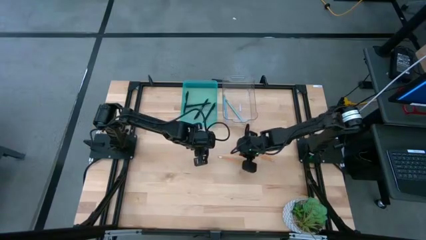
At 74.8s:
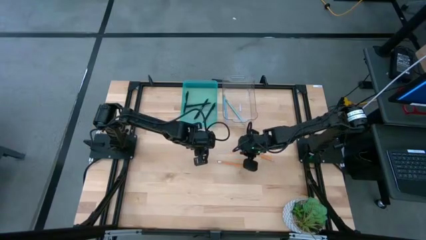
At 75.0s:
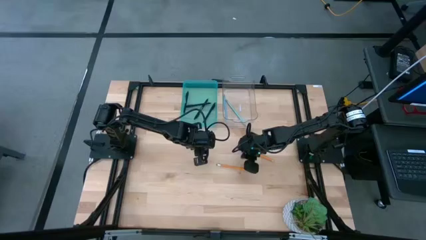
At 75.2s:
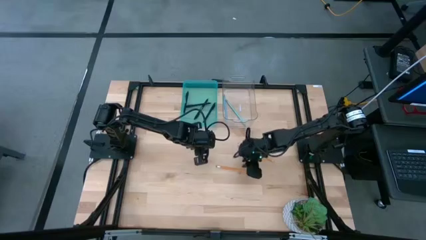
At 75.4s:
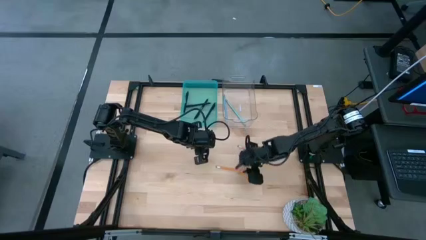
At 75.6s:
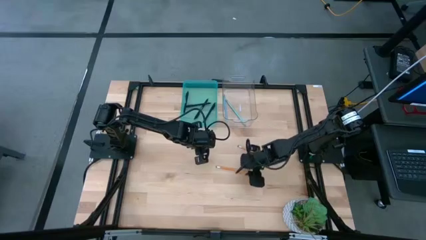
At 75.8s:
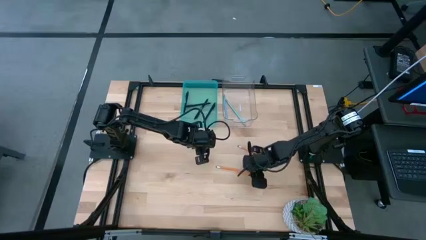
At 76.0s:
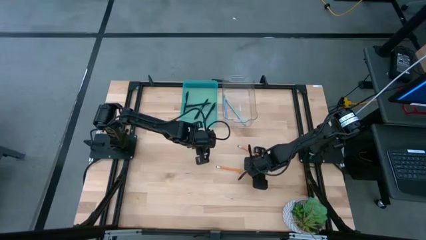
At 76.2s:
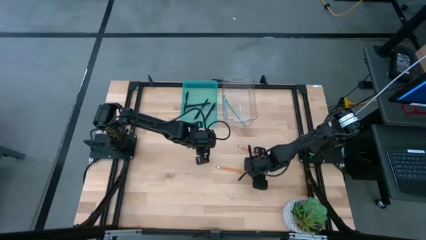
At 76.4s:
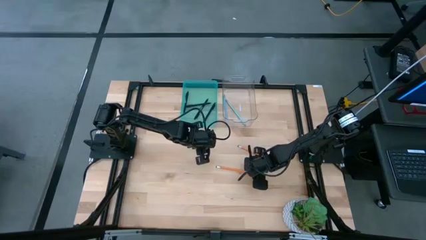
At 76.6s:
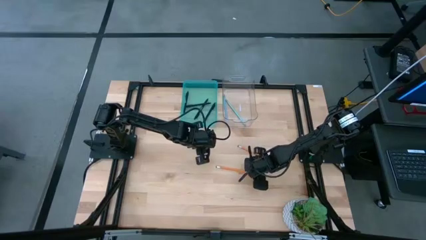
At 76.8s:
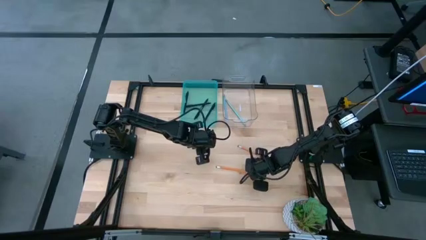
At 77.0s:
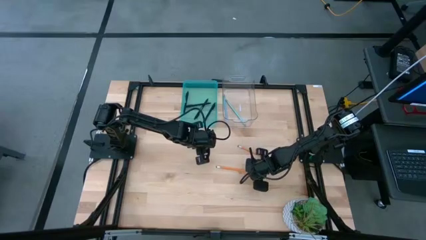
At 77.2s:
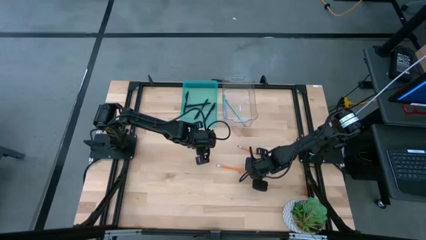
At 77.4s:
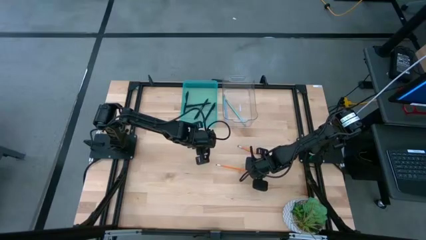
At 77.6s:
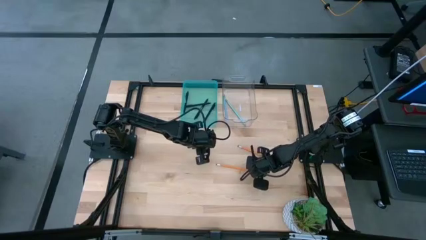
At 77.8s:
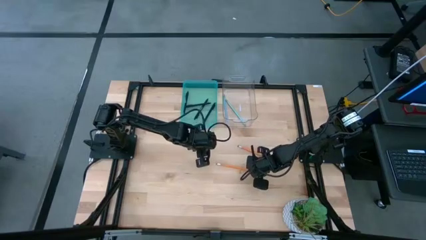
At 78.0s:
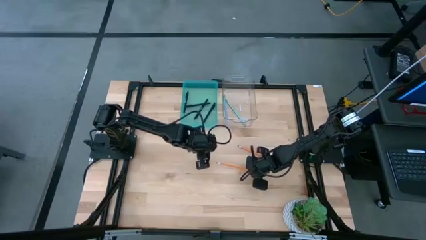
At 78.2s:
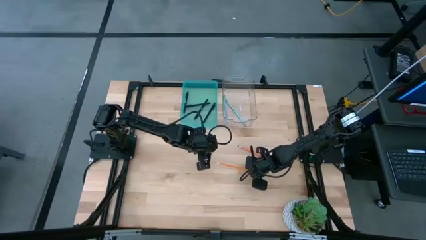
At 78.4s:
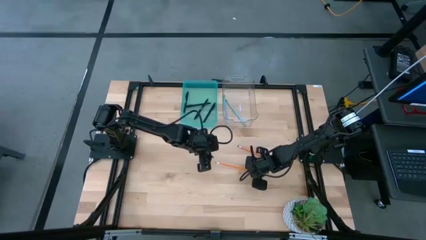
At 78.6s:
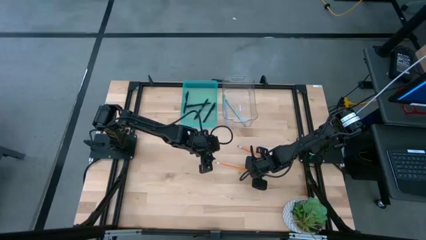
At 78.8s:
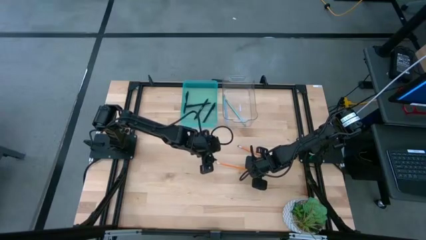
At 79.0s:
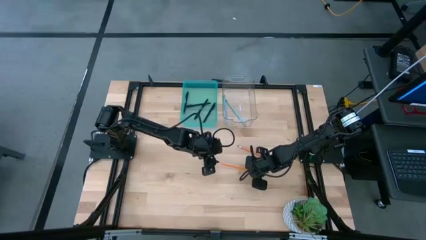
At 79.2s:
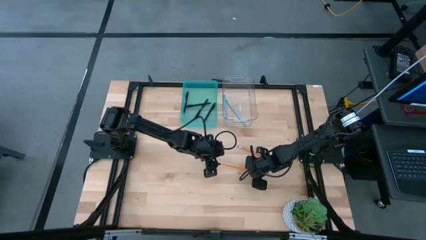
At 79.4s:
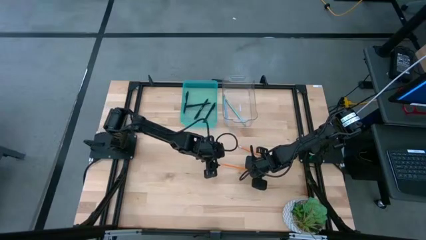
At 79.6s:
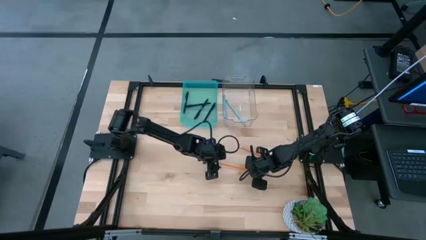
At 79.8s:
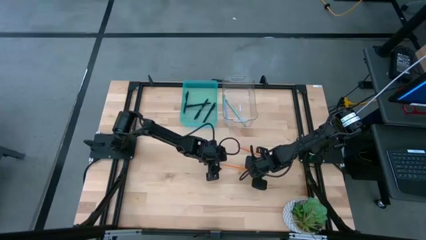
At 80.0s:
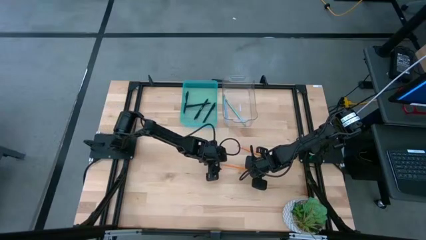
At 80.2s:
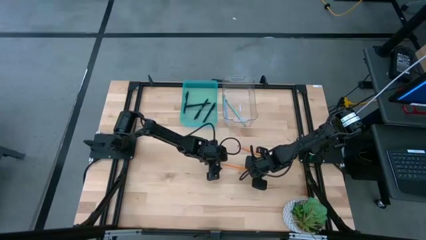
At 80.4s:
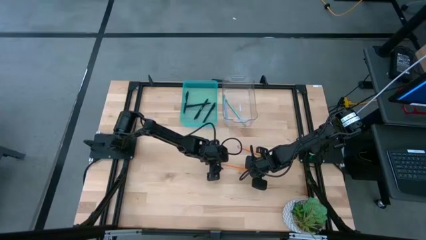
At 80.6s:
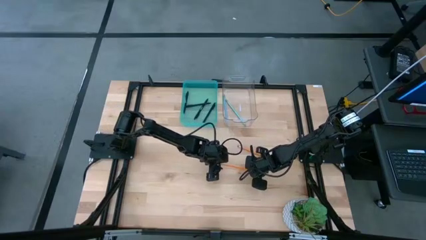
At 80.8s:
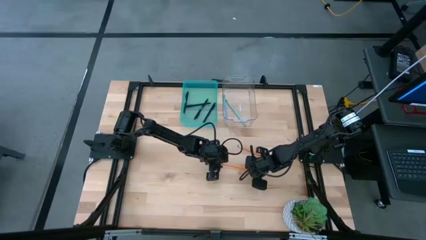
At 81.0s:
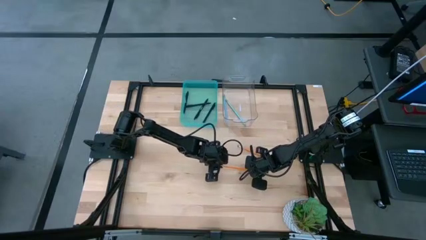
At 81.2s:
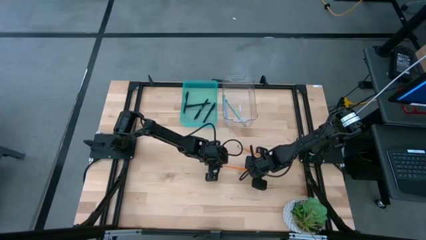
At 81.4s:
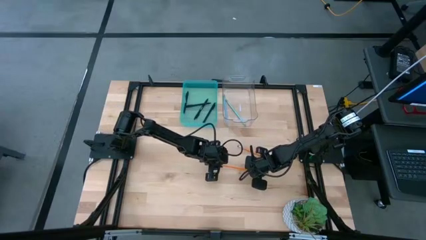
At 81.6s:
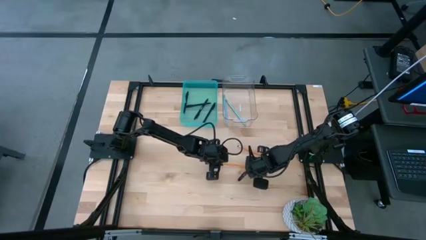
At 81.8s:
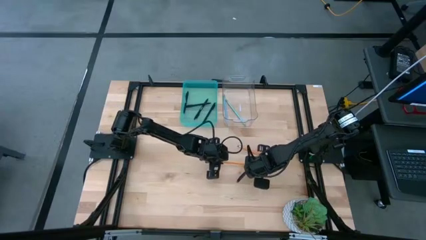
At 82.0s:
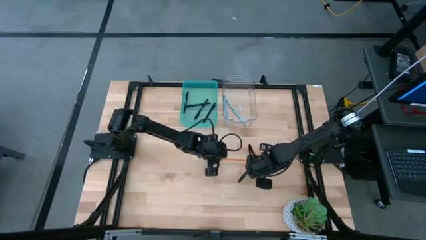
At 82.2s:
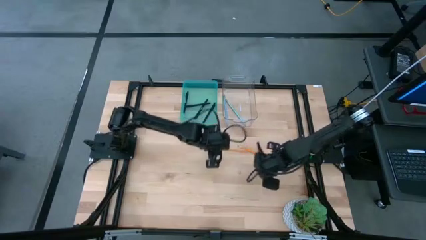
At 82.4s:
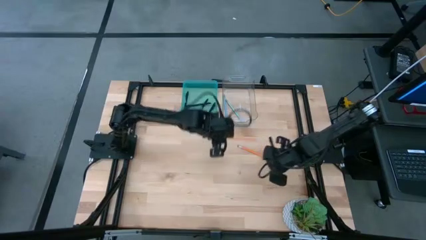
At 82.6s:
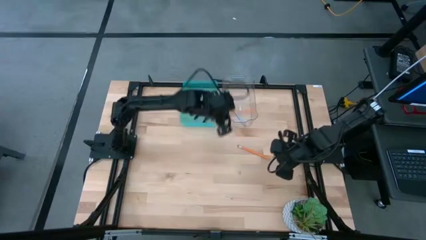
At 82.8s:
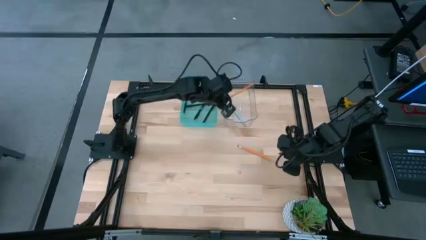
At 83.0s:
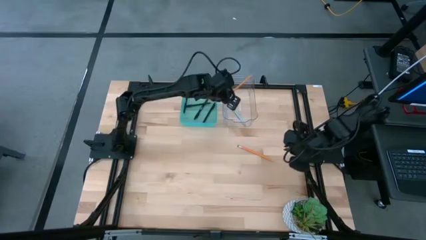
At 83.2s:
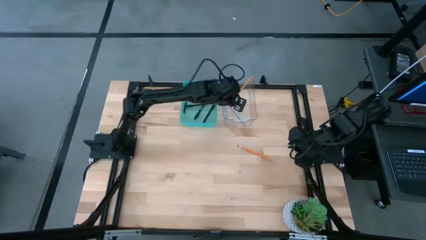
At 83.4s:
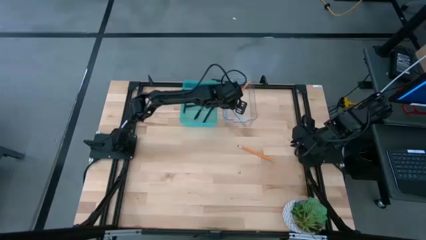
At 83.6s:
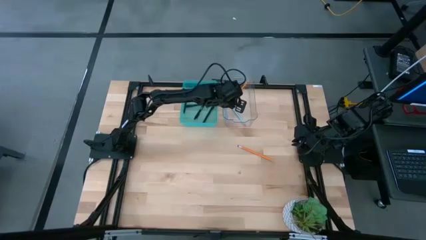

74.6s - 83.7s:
Task: Sort pens & pencils
Put the bottom yellow pencil into the transparent bin

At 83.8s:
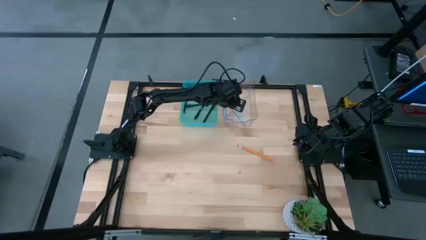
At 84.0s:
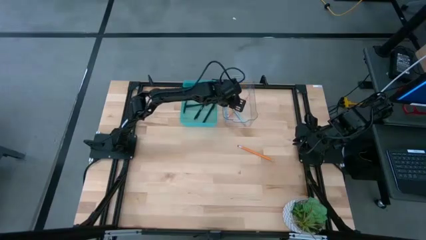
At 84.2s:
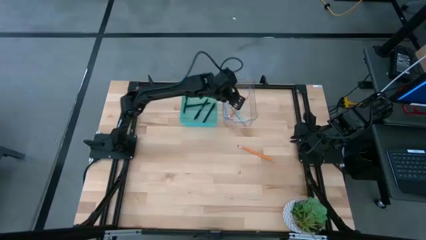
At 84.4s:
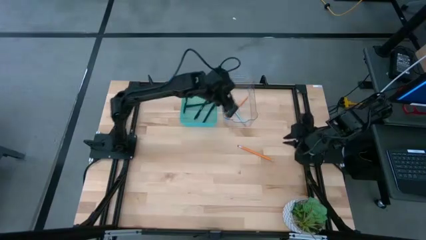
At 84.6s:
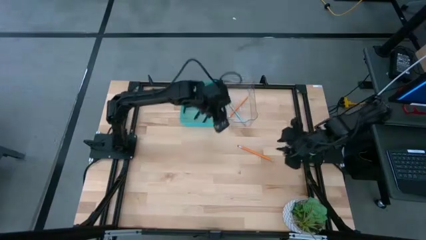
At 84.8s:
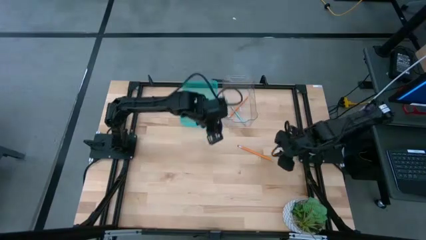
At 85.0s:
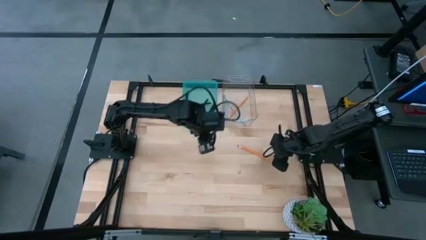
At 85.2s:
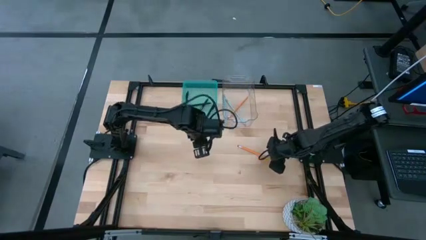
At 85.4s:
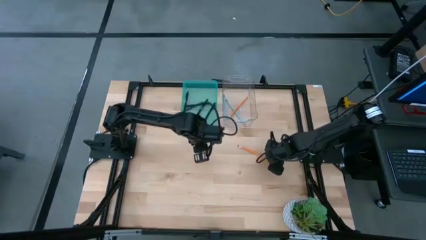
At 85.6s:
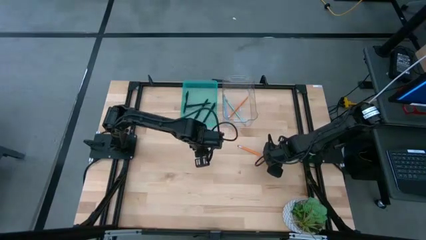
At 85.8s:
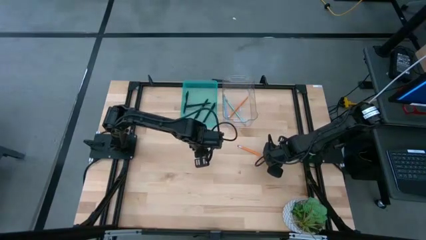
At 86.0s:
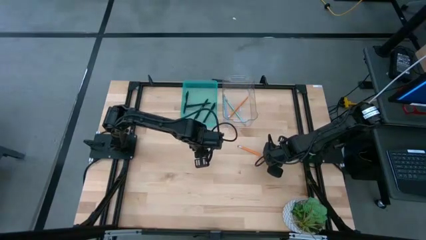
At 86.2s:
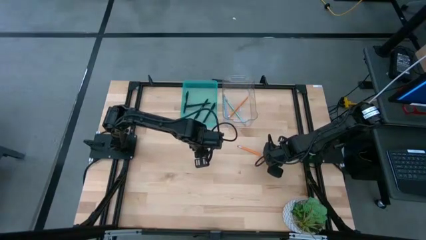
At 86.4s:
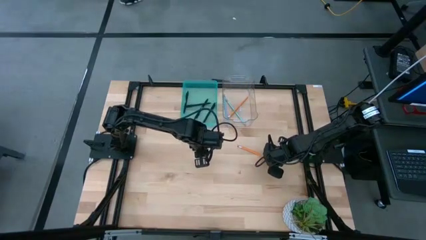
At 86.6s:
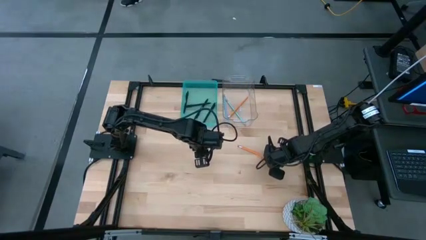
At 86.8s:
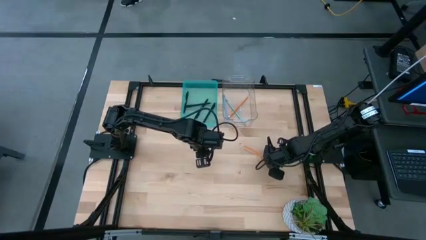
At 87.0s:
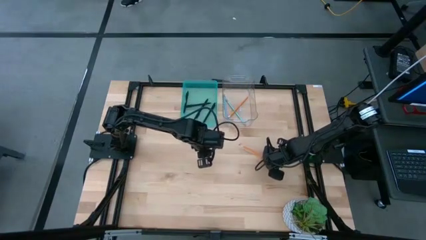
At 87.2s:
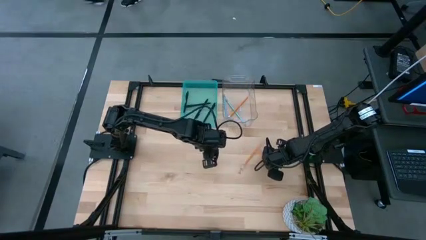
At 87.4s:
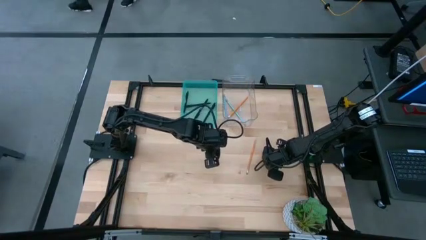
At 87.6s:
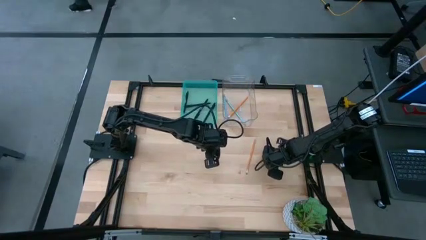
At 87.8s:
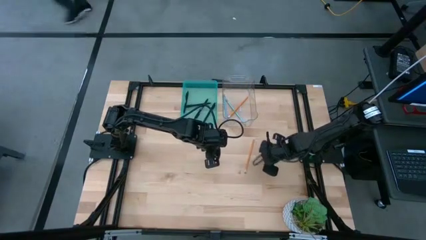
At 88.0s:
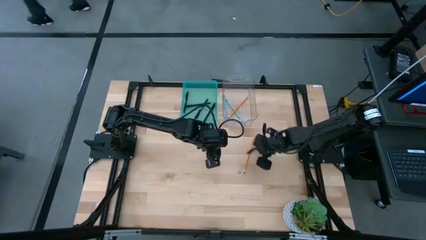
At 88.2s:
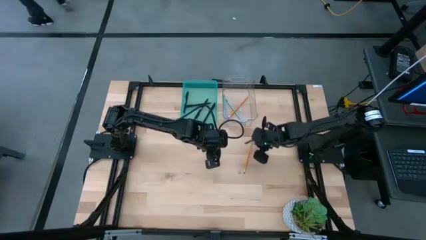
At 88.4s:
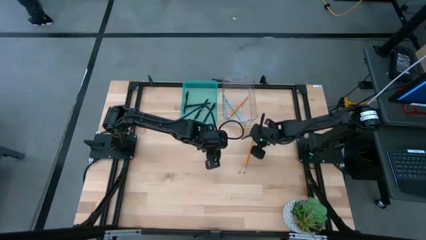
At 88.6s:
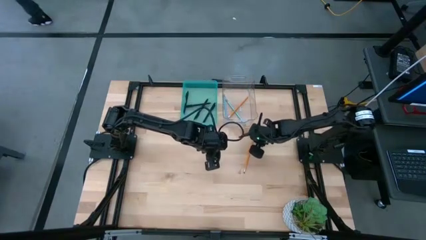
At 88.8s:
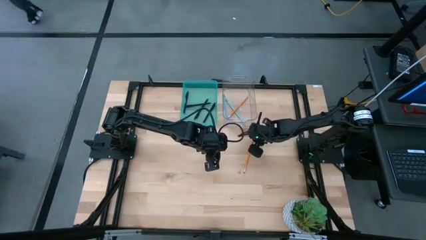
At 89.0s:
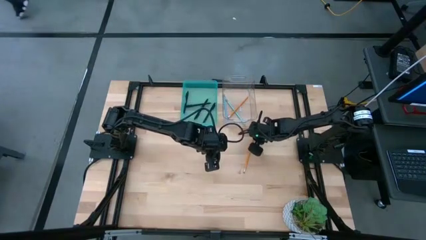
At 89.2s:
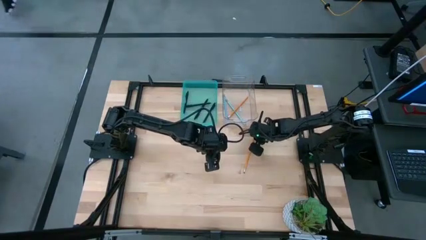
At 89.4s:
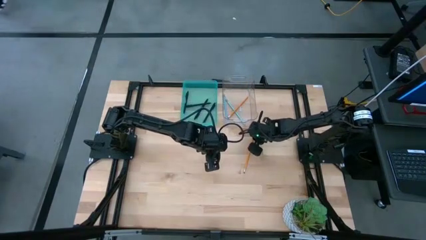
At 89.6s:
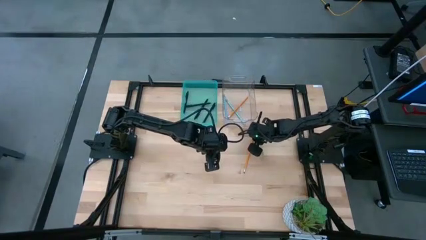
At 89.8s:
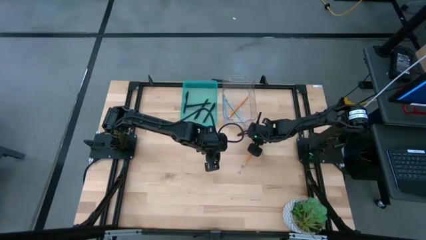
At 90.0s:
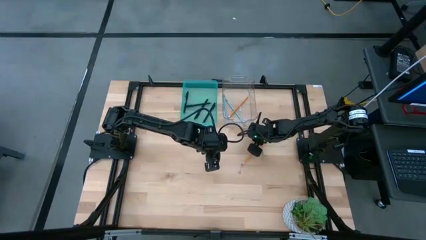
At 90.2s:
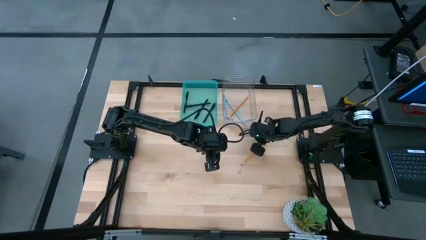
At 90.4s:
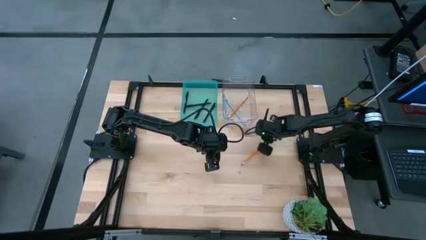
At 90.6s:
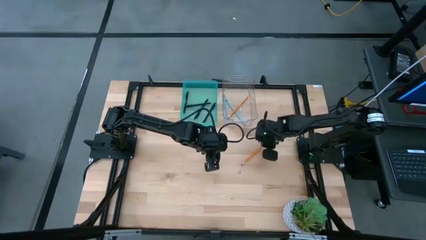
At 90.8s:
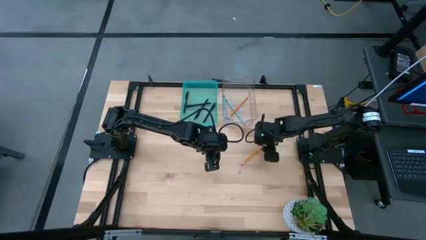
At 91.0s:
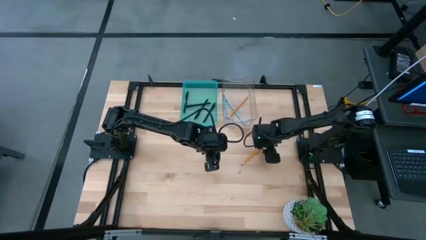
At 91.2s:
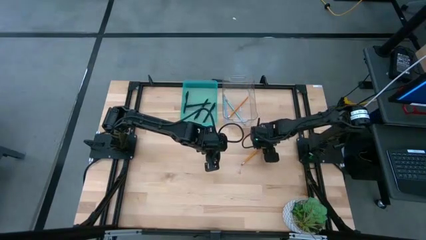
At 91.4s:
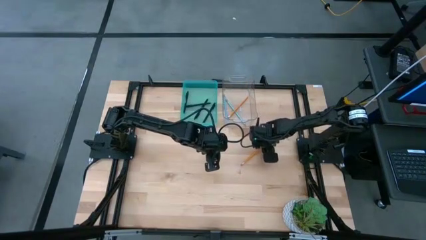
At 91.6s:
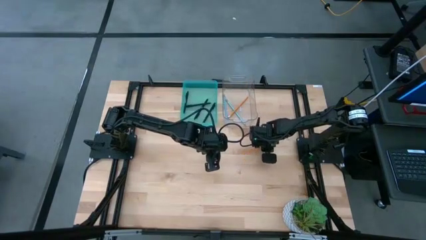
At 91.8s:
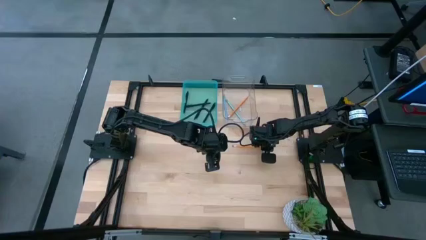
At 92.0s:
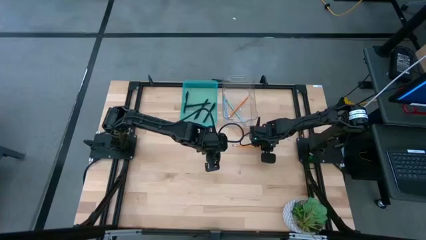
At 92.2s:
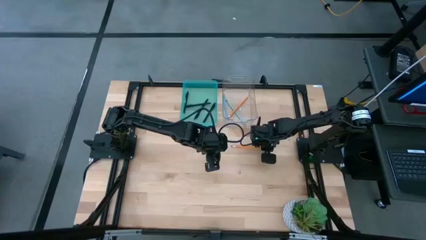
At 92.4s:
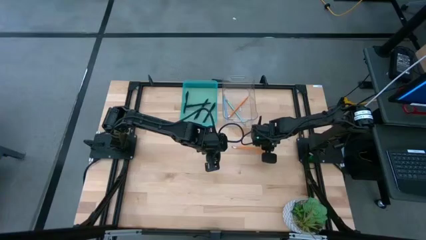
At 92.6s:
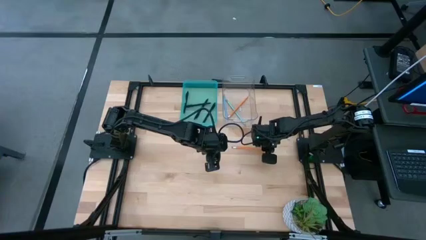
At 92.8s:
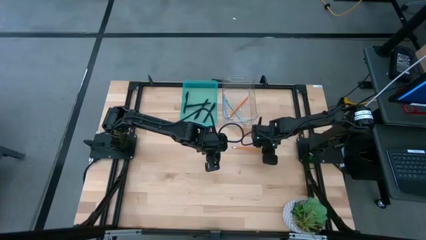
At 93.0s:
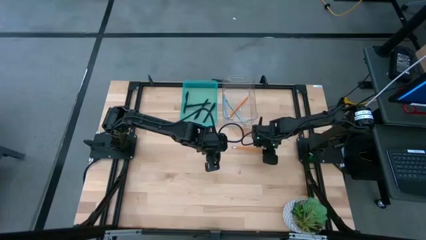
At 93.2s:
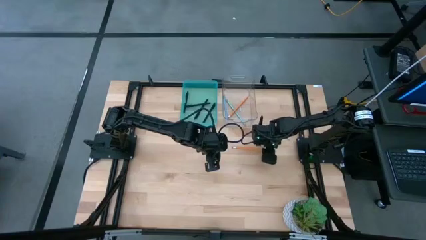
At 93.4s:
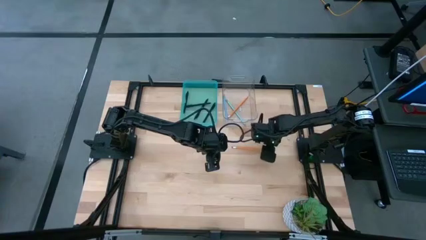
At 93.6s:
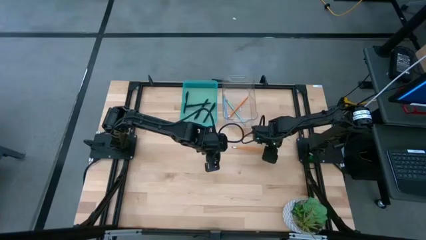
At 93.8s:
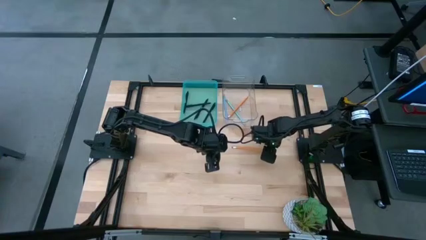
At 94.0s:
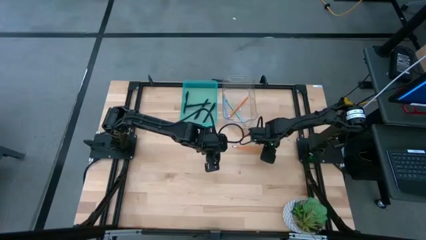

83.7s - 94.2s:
Put the yellow pencil into the transparent bin
